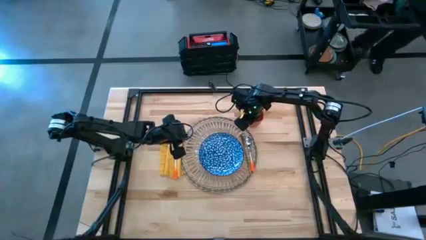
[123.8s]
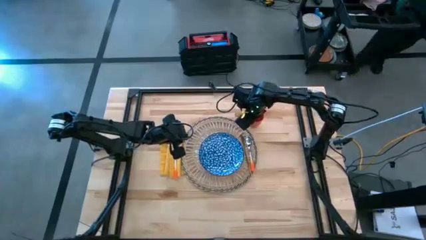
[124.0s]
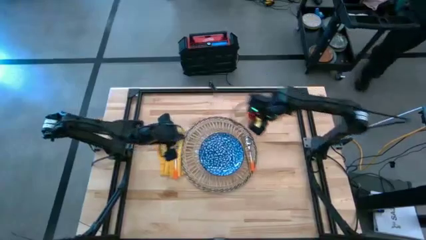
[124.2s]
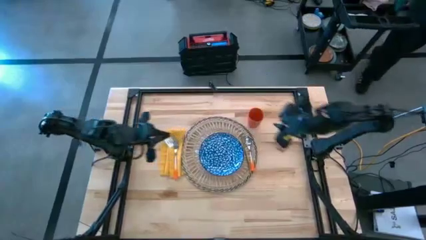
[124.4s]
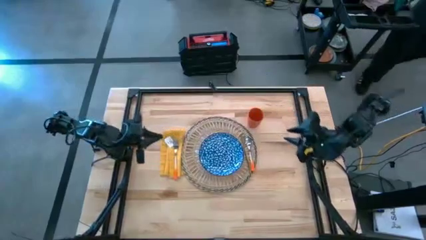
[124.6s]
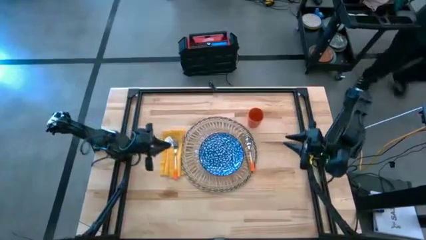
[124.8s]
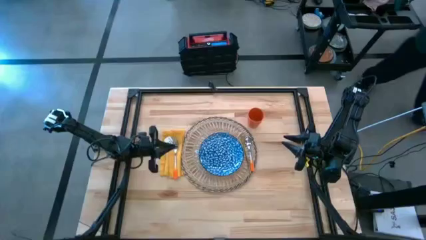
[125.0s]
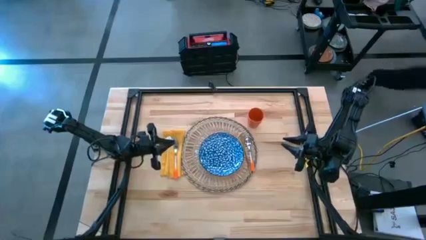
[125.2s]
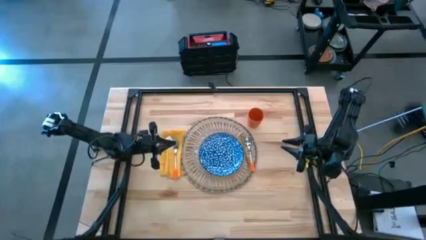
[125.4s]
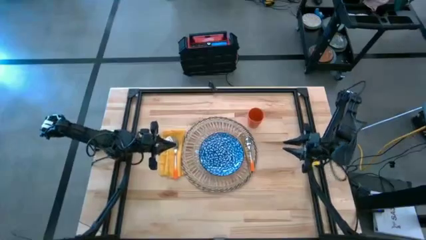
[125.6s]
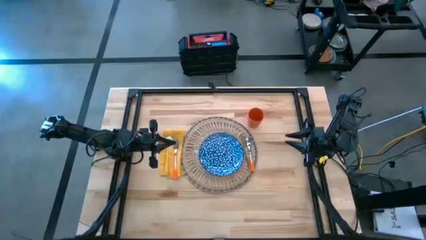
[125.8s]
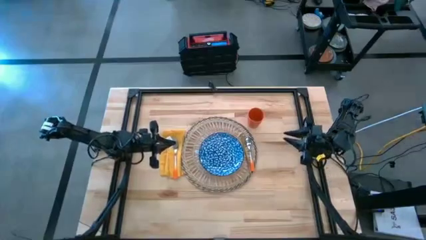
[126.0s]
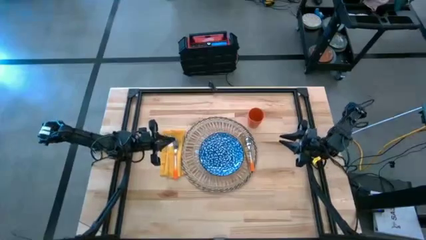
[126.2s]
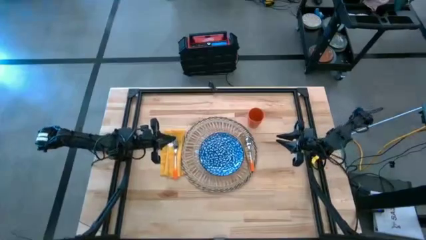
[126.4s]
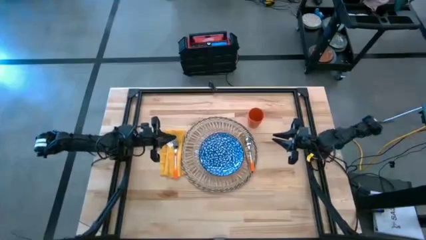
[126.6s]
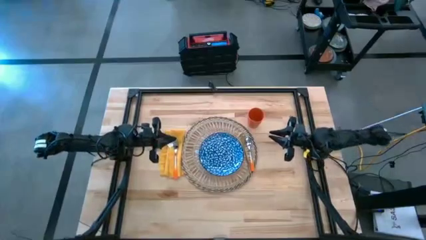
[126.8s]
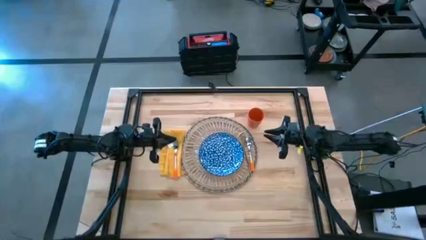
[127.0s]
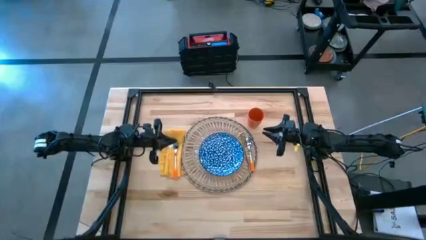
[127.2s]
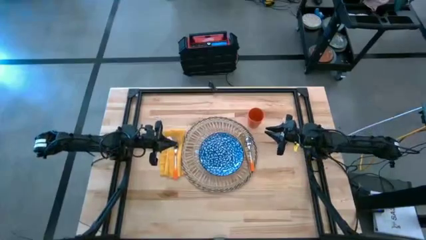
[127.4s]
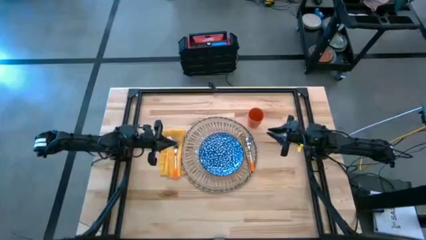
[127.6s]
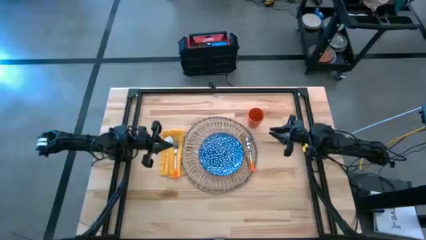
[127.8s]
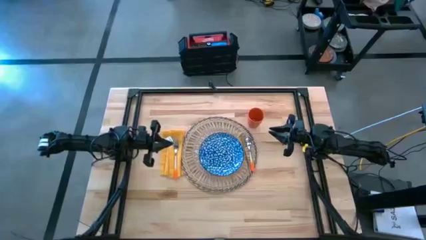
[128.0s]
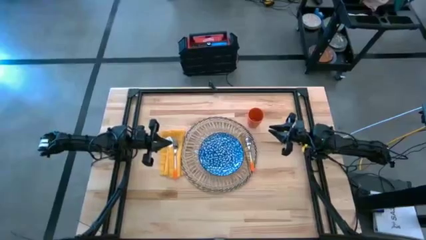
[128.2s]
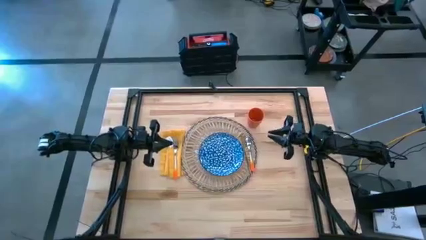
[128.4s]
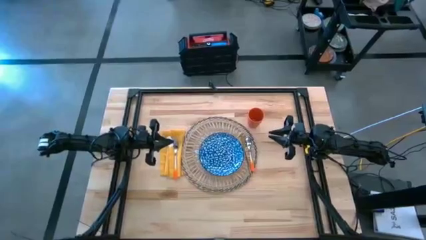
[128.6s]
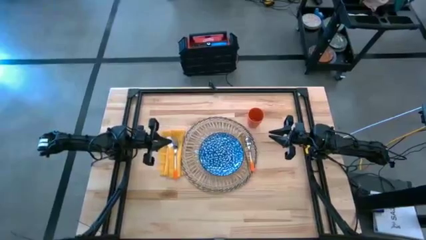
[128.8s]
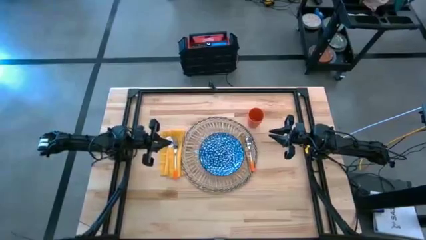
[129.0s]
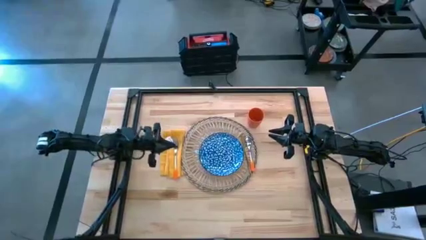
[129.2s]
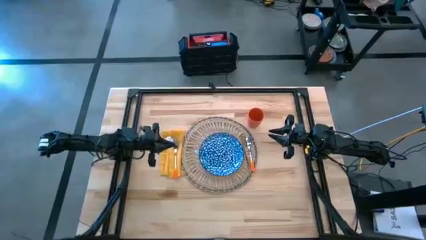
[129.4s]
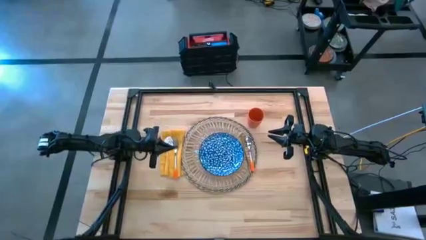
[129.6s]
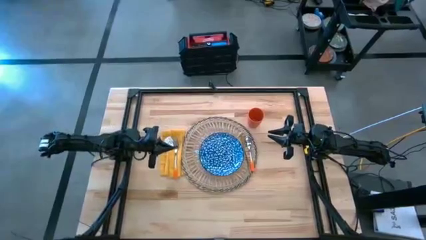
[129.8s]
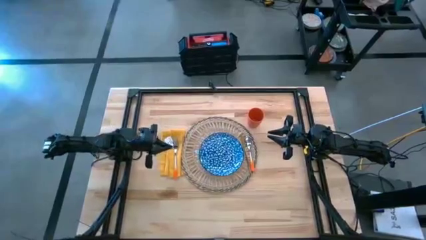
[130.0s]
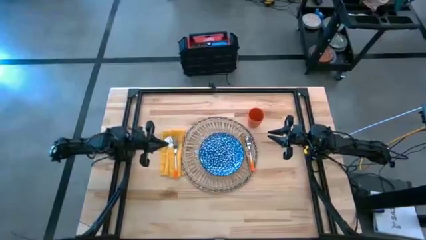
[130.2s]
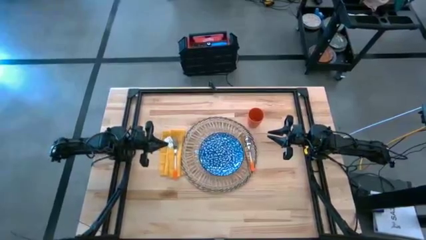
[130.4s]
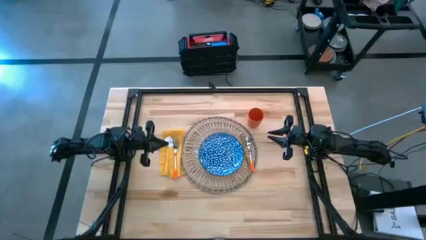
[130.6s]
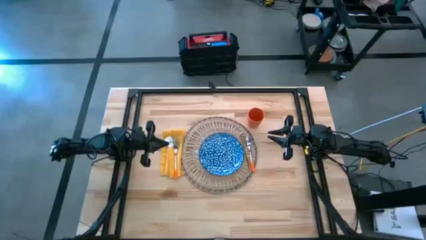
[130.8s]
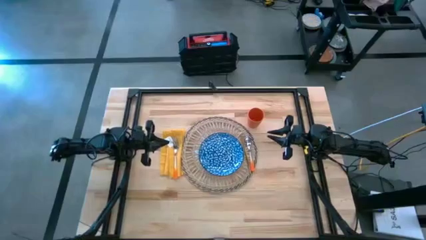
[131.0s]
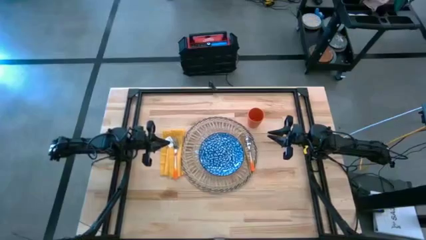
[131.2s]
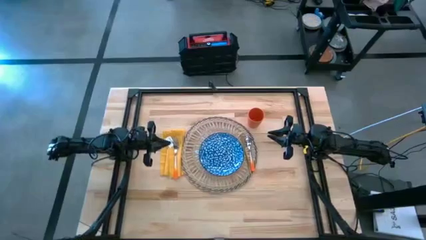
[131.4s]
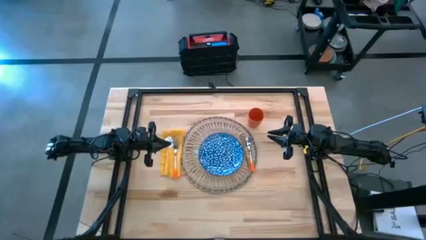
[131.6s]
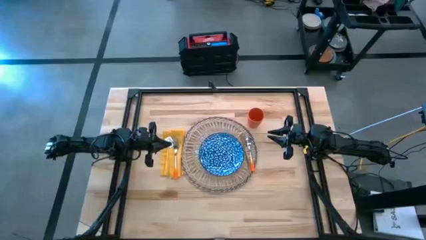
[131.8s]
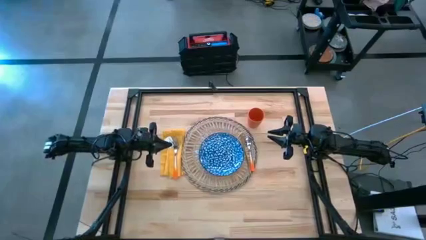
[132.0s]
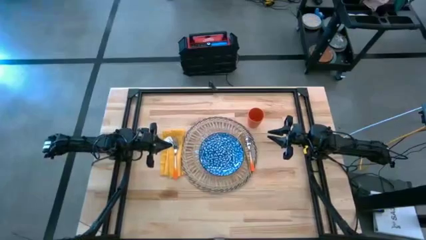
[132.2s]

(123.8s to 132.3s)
Task: Set table place
Return to Home Position
